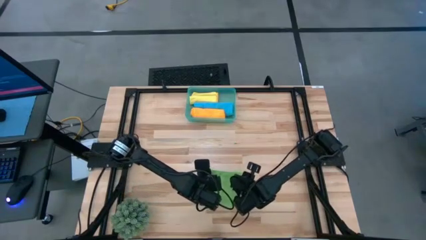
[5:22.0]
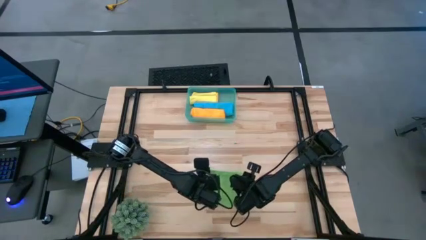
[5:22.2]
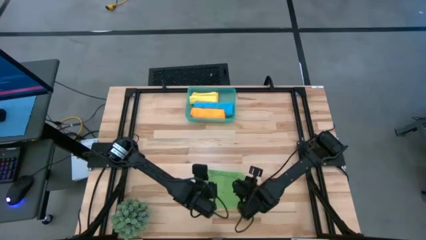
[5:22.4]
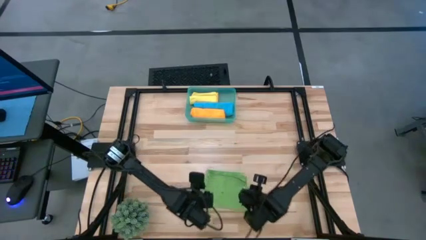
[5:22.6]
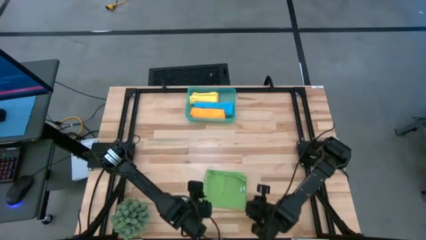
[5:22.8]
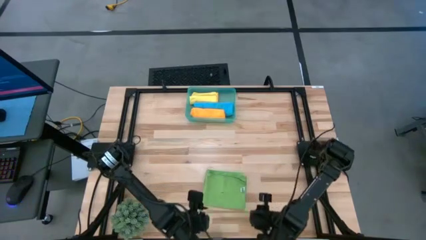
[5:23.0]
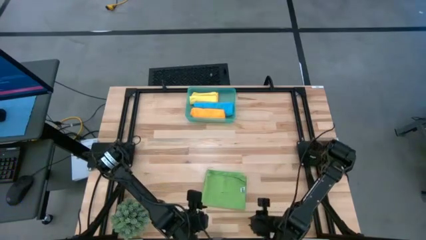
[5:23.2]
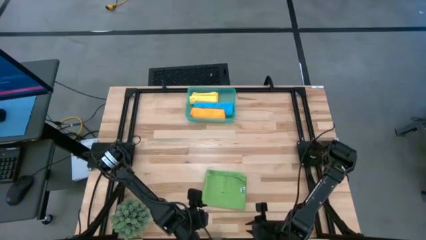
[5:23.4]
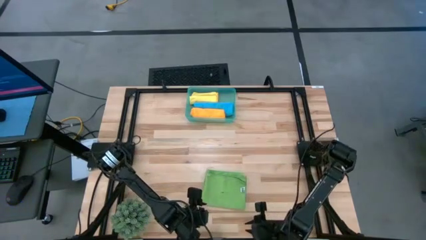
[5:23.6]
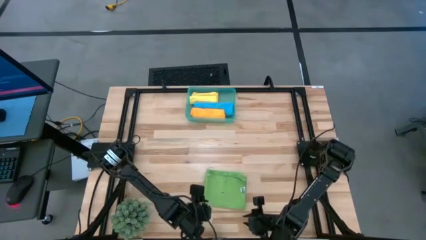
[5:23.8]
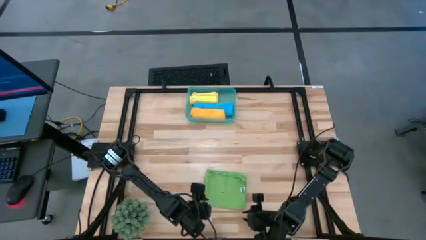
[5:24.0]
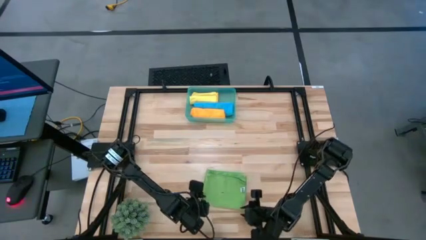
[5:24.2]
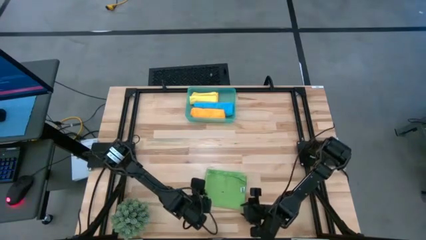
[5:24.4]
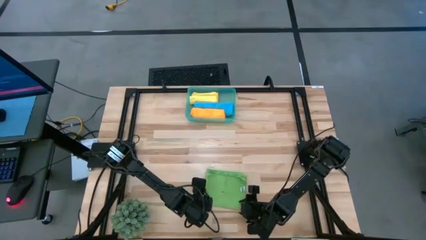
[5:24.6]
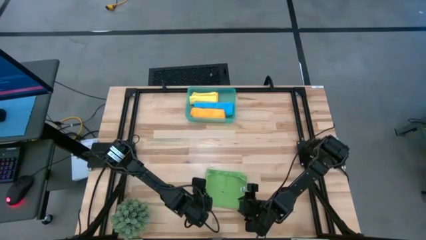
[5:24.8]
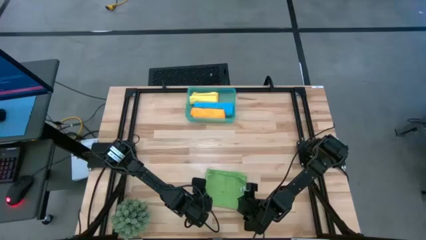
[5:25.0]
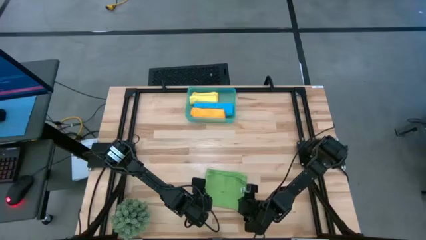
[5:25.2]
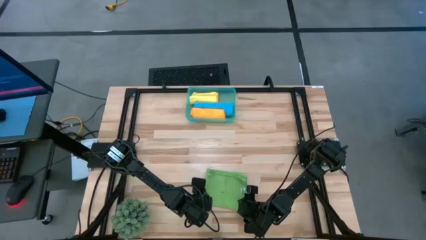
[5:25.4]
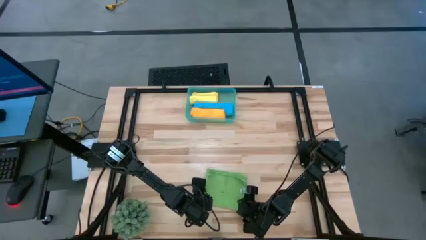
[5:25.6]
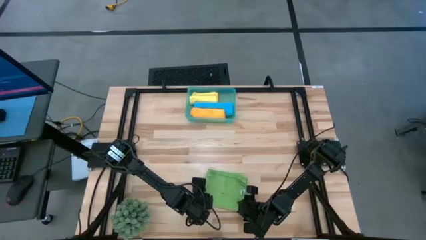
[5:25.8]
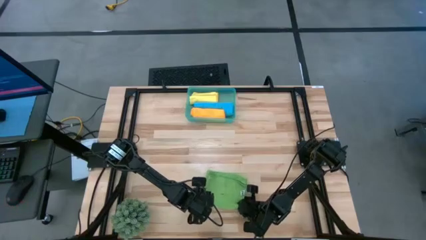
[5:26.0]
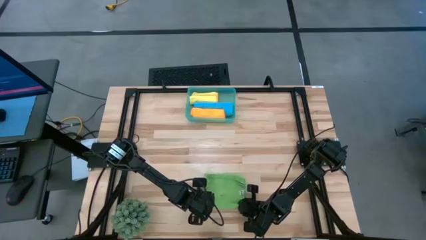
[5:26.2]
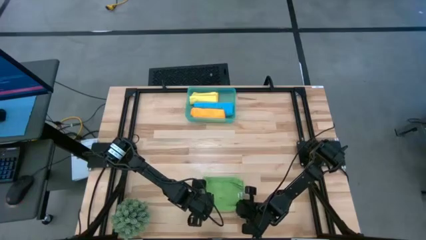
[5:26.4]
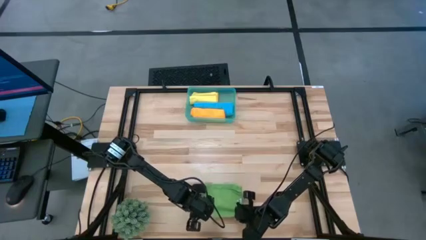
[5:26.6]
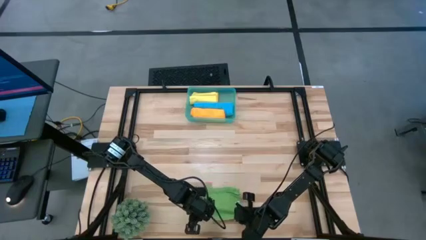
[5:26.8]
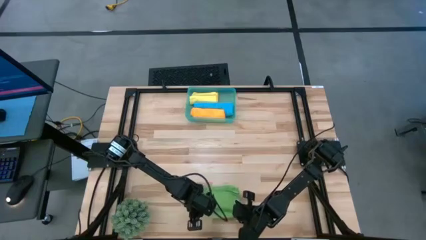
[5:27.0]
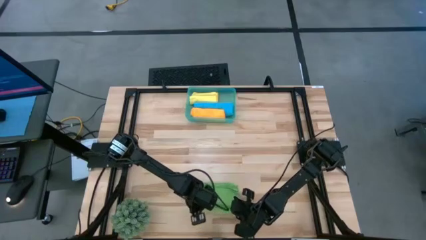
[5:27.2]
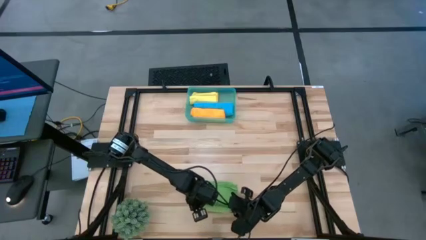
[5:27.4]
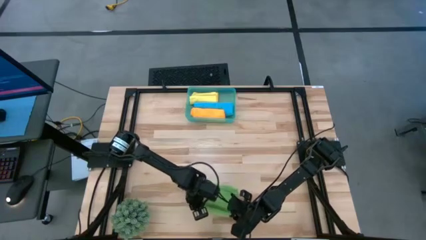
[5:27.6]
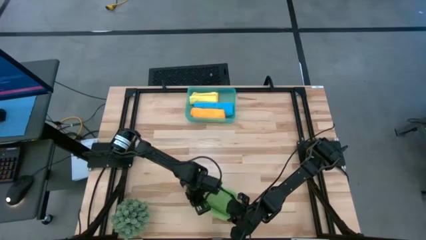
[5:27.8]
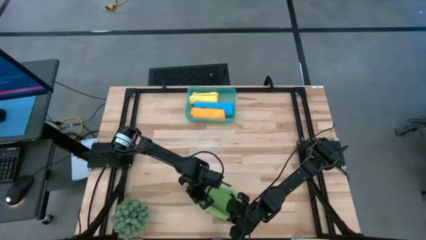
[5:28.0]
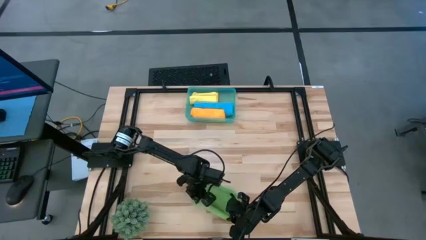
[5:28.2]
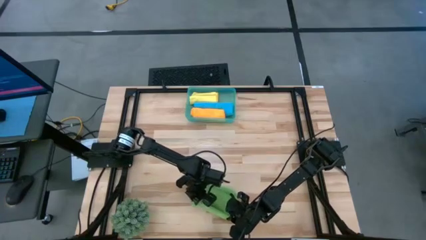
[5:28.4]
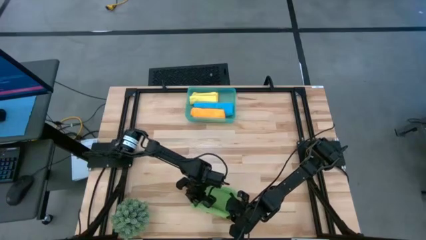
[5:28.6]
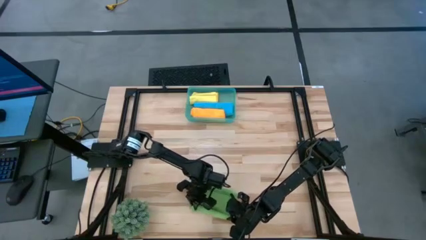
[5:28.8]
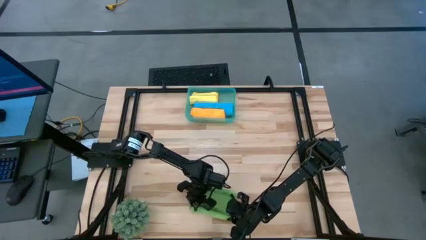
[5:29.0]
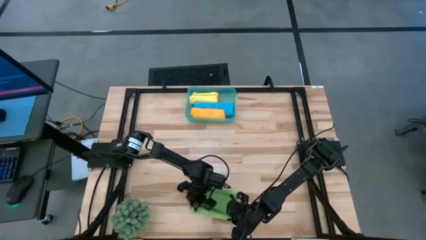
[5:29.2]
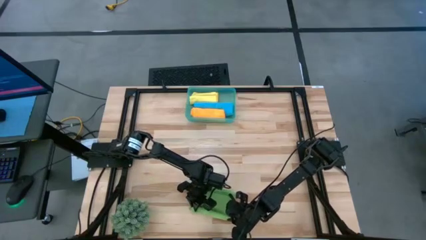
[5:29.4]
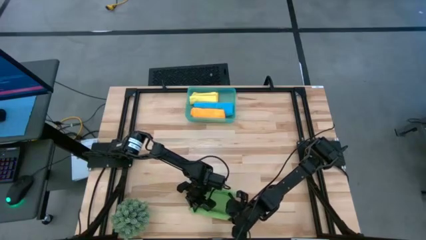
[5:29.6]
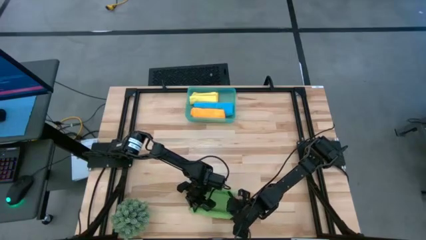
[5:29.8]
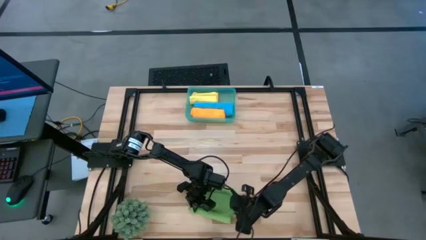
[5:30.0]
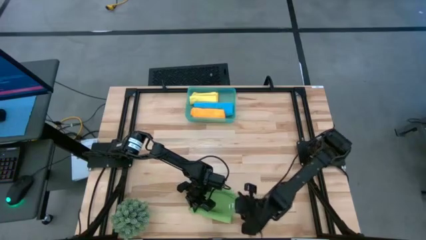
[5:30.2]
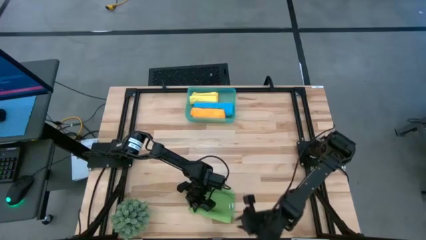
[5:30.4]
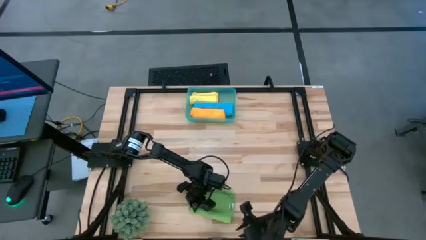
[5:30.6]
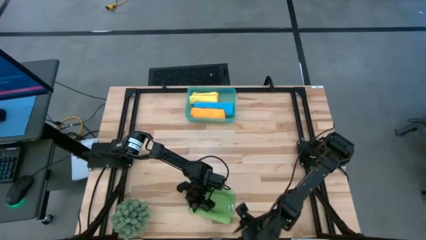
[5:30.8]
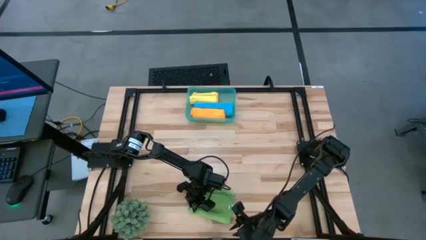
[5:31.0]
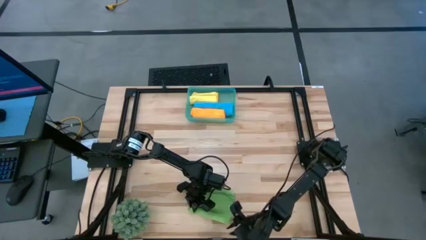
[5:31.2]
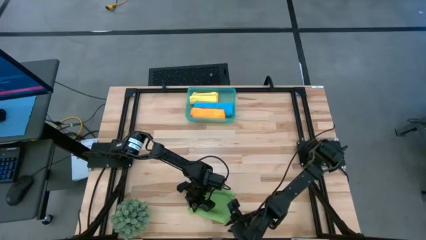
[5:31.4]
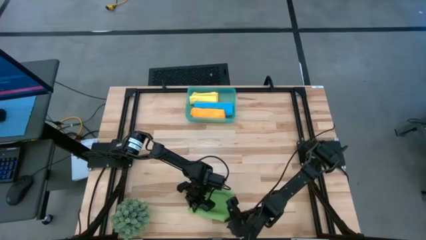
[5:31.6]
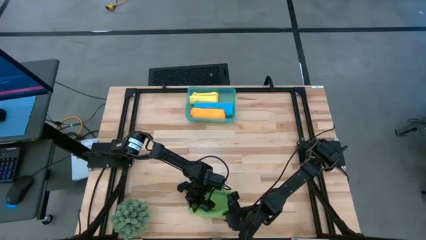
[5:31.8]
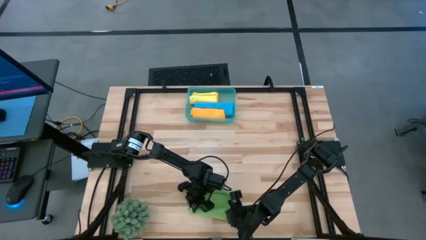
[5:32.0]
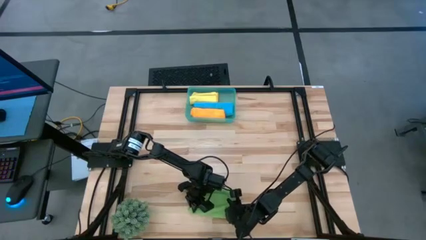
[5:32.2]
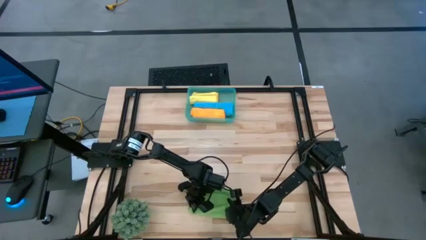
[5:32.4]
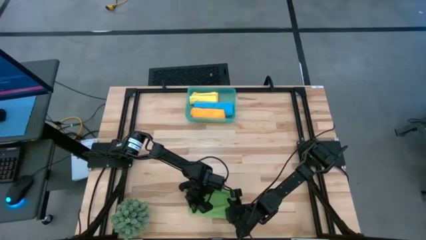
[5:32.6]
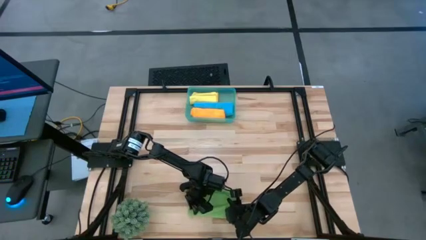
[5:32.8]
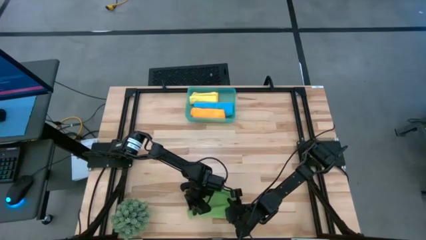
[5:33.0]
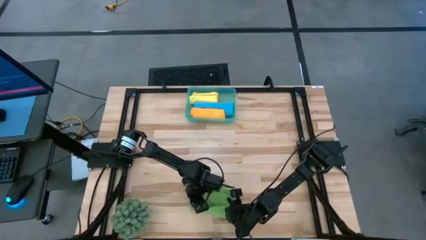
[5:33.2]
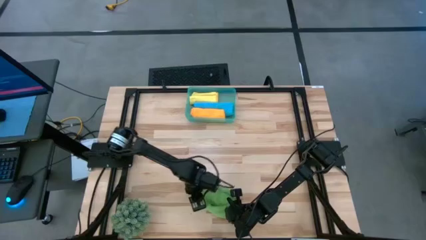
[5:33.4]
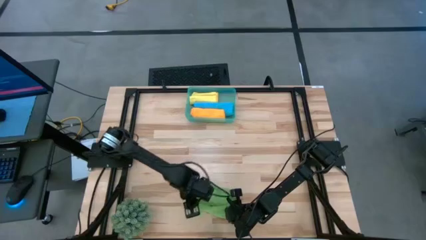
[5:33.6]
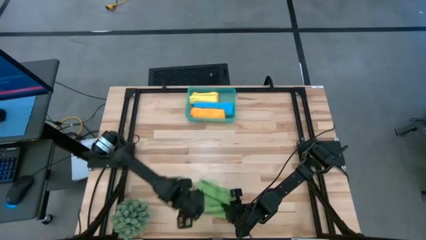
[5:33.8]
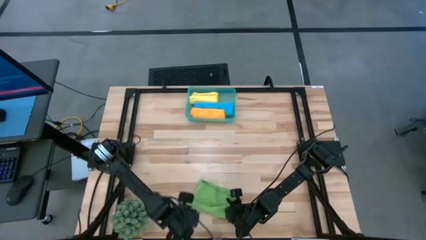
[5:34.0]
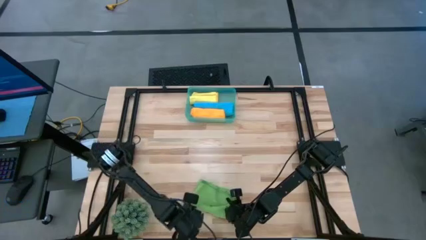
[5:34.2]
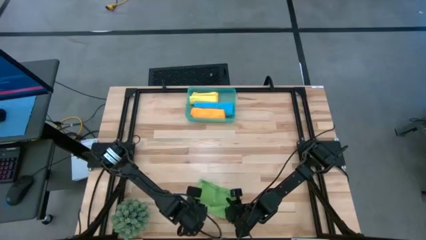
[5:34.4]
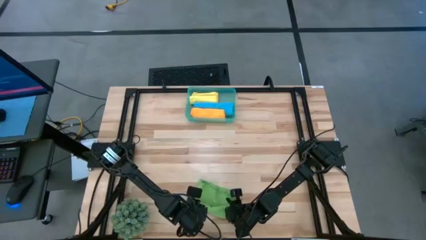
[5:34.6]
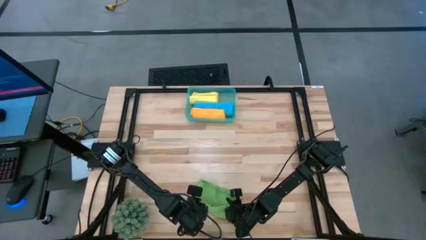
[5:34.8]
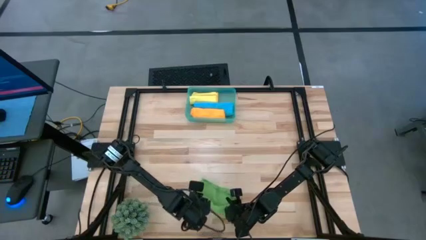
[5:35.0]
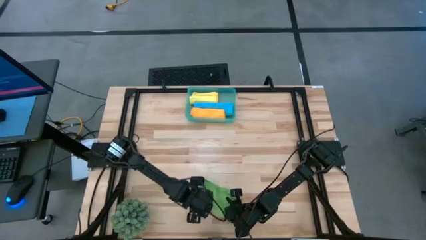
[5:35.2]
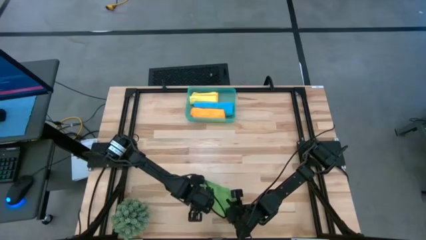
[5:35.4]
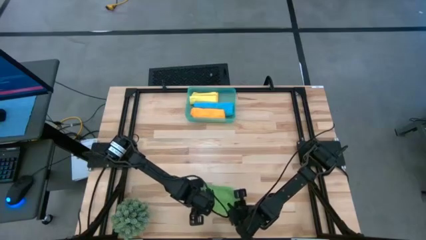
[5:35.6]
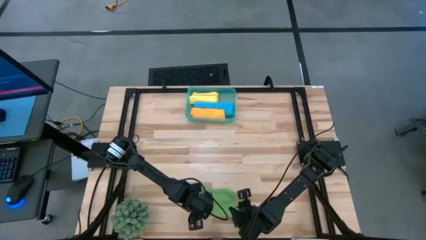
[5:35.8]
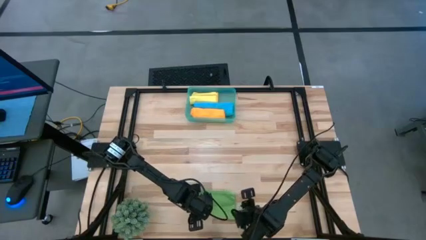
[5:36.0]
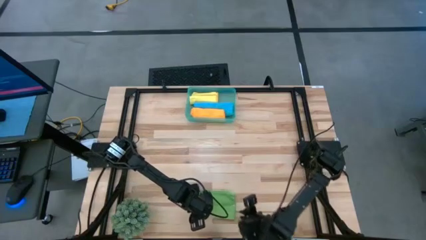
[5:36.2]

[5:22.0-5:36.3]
Task: Roll microfiber towels into tight, uniform cylinder then place into a basket
Roll the green microfiber towel
